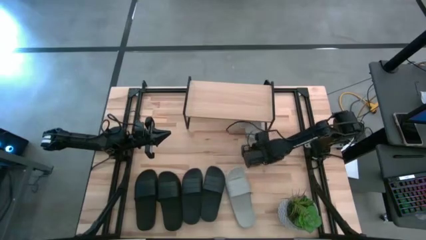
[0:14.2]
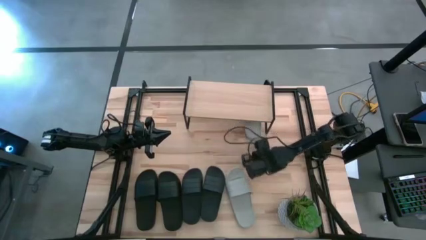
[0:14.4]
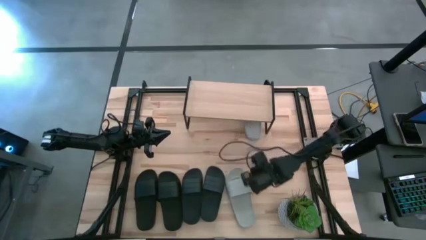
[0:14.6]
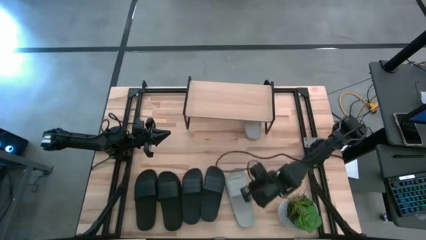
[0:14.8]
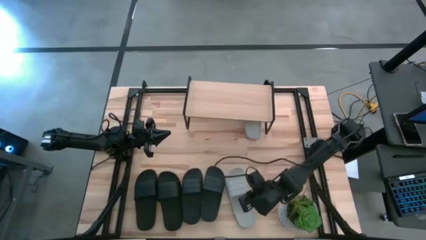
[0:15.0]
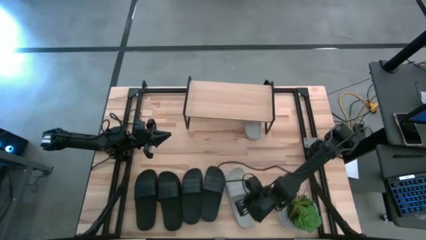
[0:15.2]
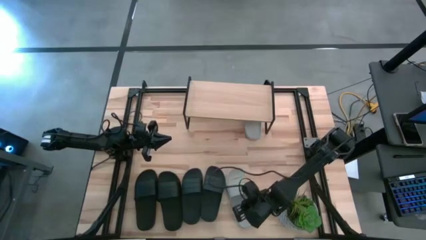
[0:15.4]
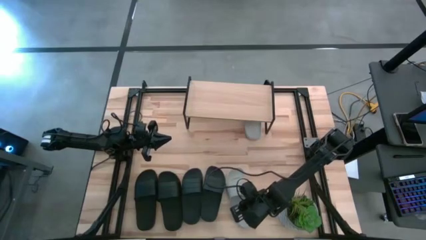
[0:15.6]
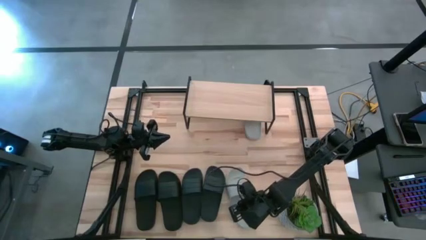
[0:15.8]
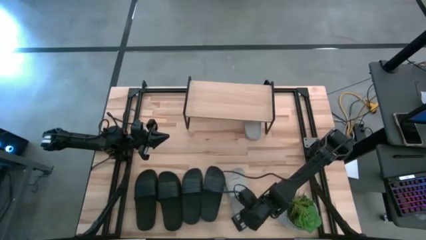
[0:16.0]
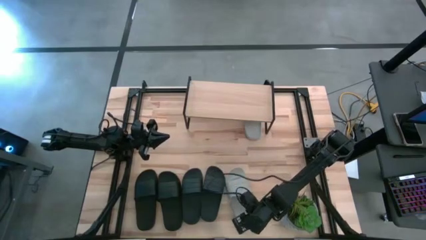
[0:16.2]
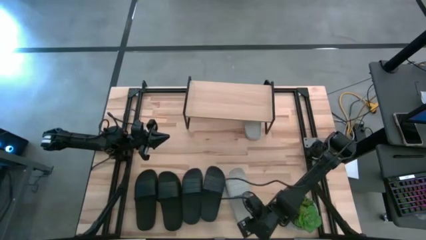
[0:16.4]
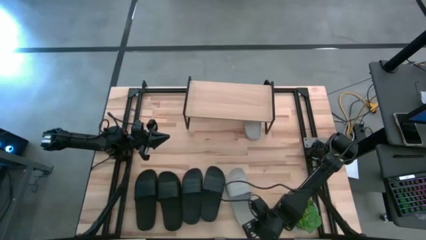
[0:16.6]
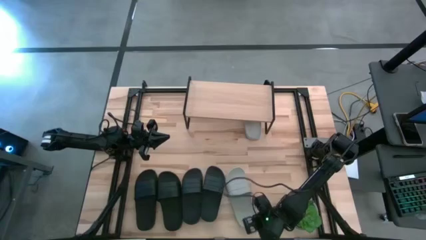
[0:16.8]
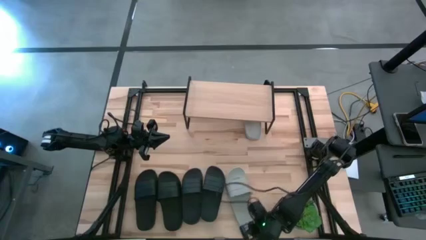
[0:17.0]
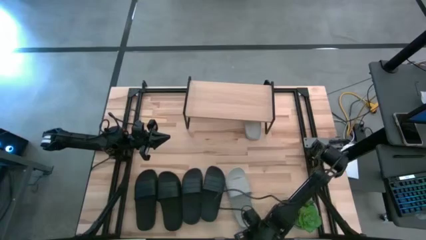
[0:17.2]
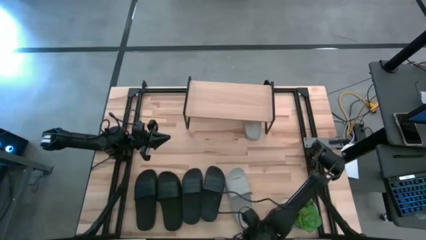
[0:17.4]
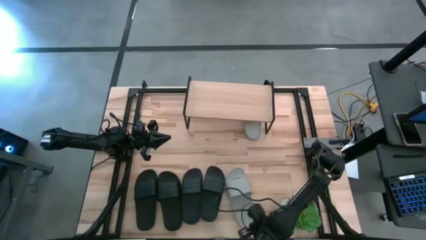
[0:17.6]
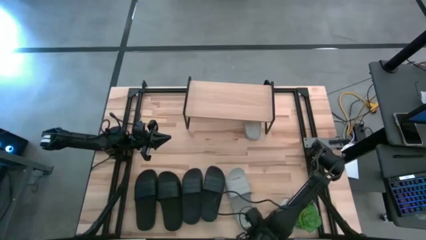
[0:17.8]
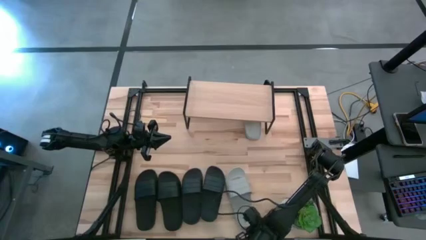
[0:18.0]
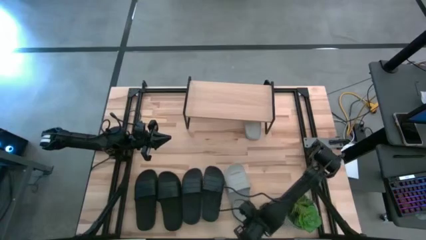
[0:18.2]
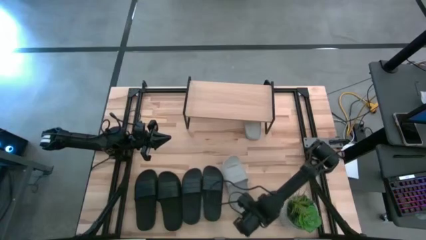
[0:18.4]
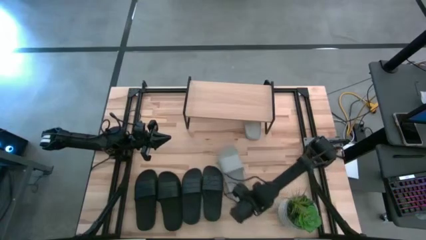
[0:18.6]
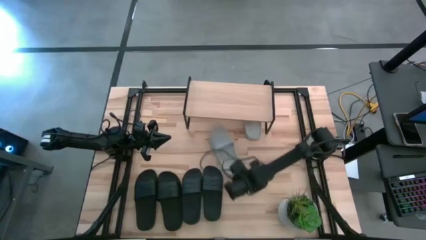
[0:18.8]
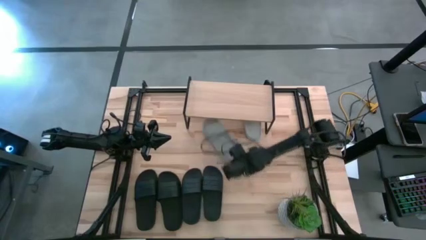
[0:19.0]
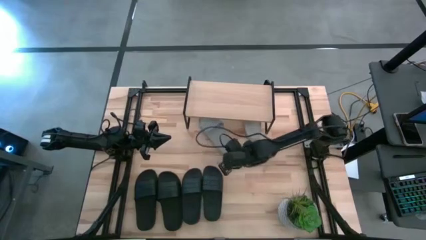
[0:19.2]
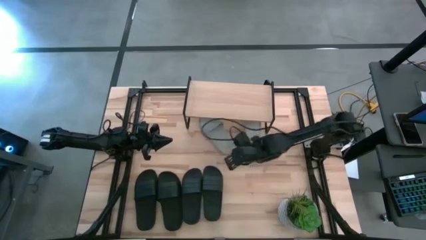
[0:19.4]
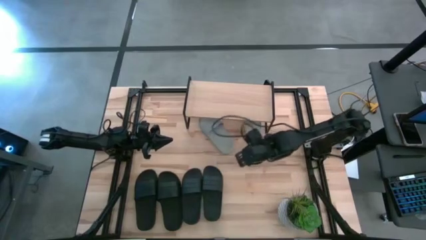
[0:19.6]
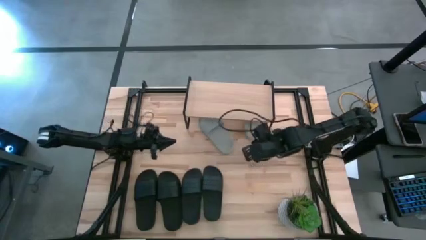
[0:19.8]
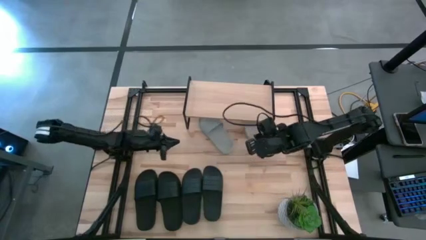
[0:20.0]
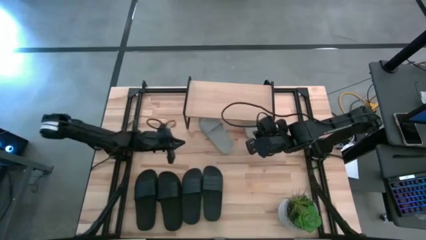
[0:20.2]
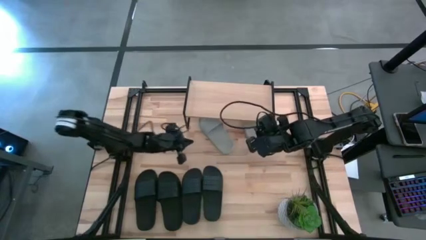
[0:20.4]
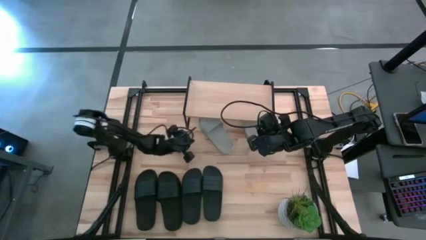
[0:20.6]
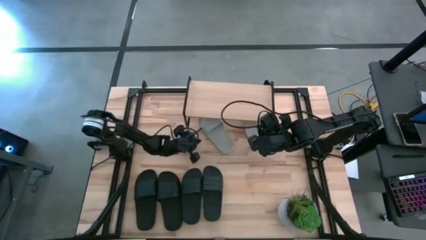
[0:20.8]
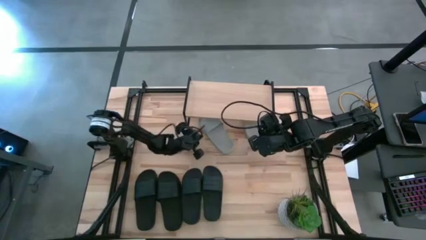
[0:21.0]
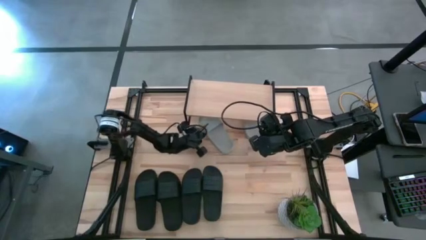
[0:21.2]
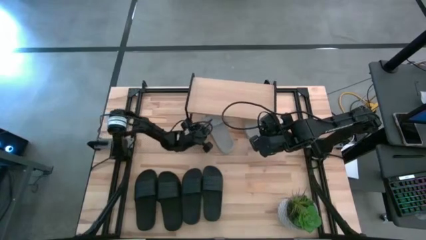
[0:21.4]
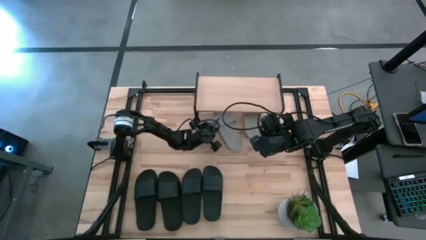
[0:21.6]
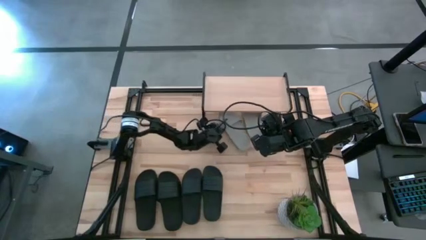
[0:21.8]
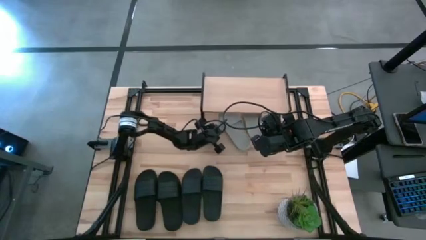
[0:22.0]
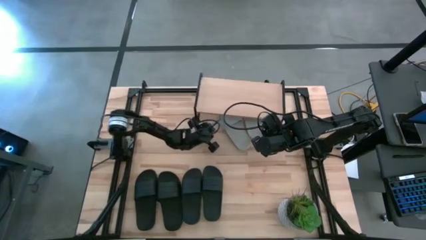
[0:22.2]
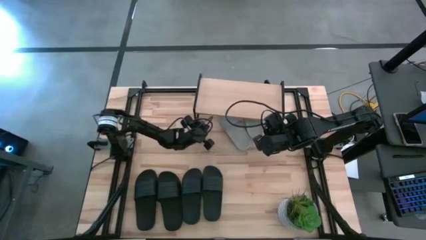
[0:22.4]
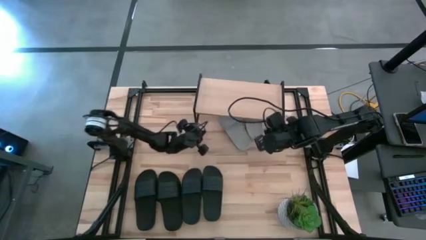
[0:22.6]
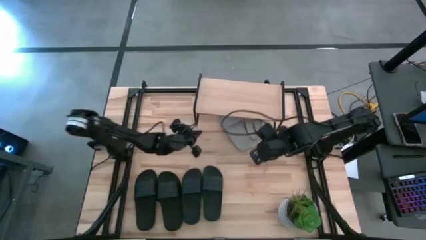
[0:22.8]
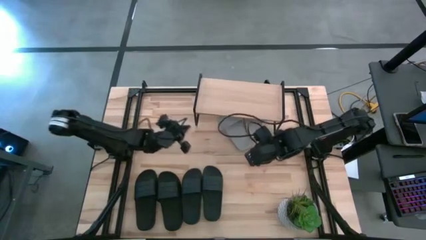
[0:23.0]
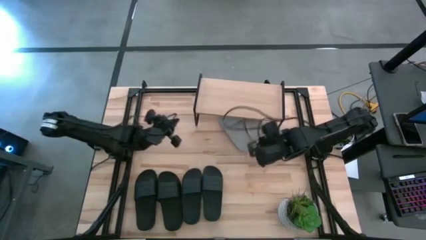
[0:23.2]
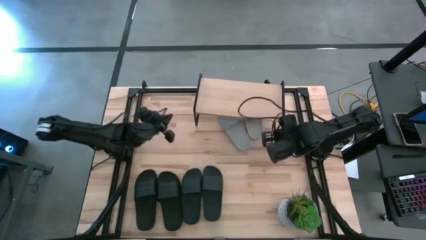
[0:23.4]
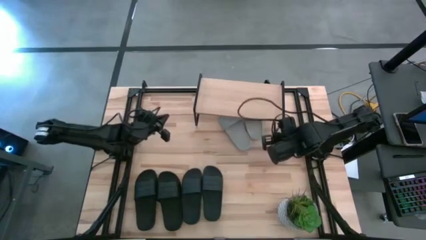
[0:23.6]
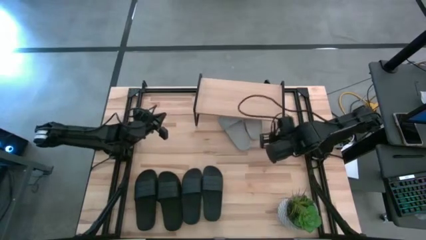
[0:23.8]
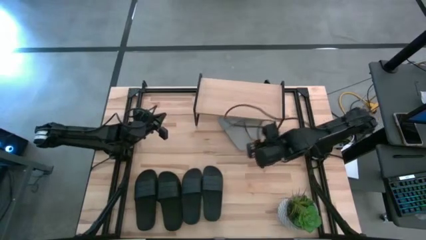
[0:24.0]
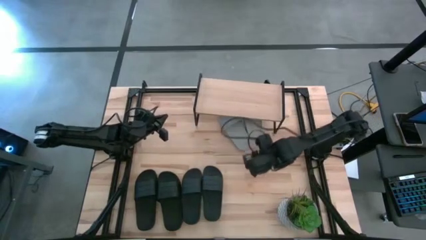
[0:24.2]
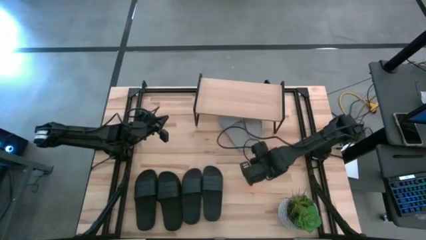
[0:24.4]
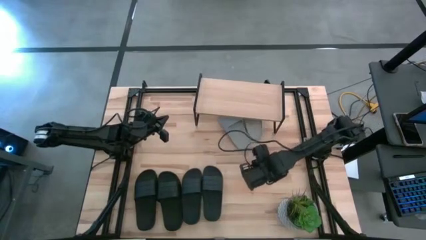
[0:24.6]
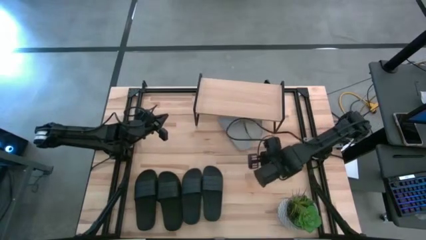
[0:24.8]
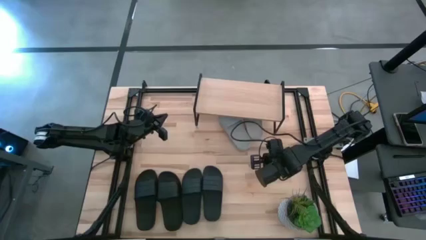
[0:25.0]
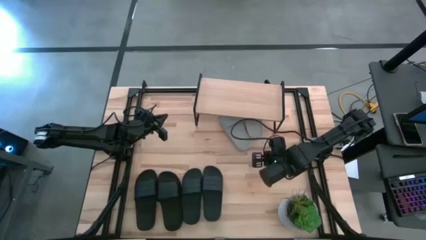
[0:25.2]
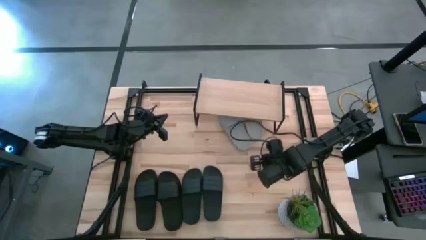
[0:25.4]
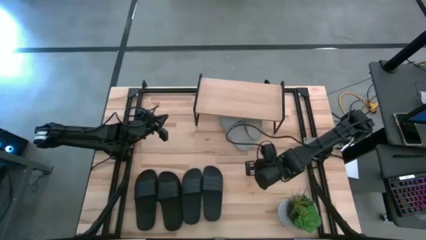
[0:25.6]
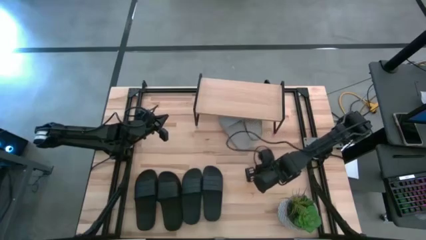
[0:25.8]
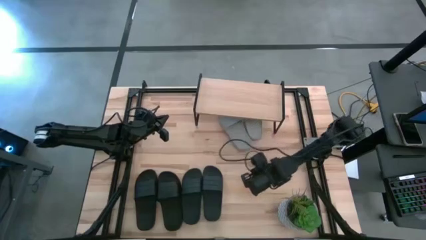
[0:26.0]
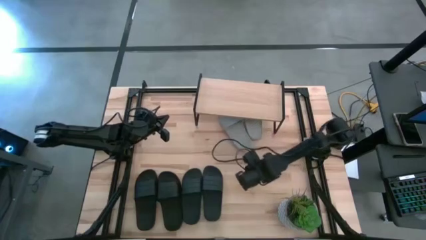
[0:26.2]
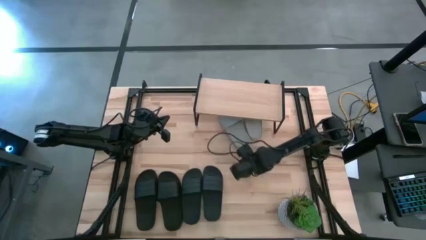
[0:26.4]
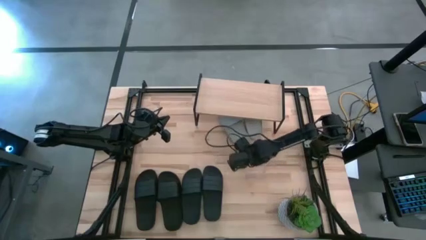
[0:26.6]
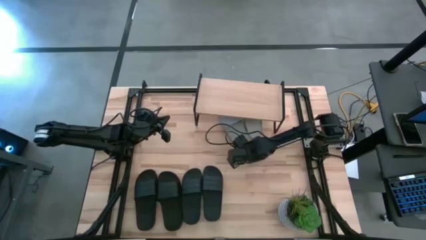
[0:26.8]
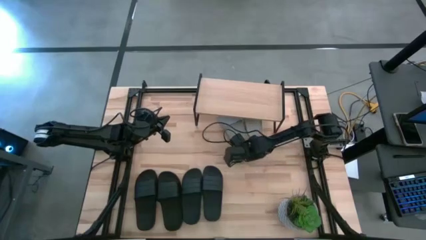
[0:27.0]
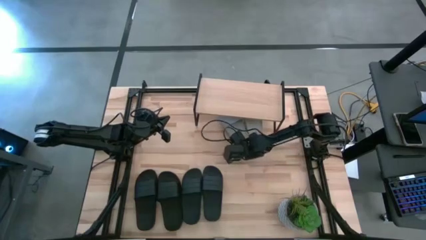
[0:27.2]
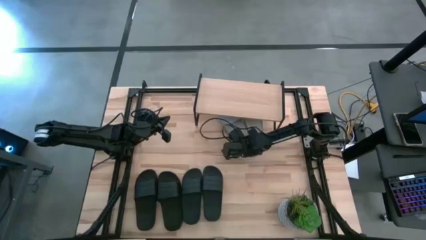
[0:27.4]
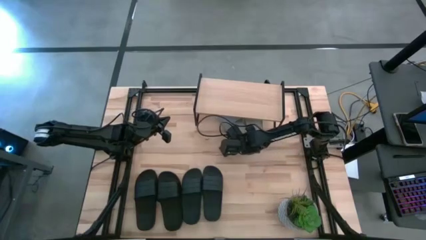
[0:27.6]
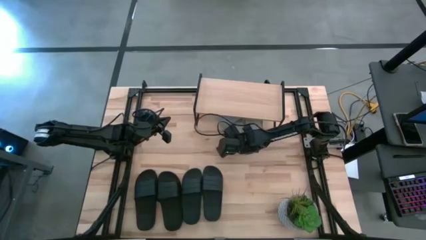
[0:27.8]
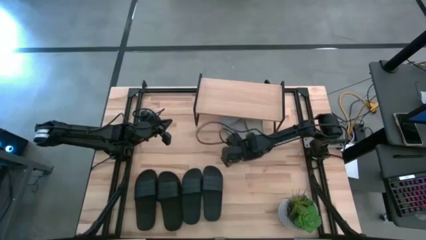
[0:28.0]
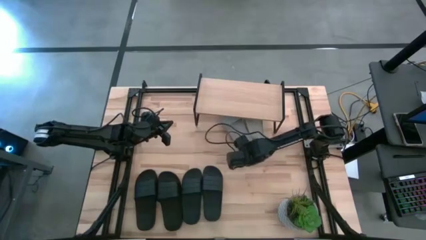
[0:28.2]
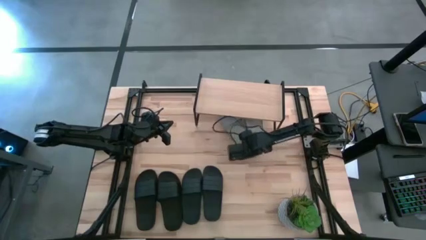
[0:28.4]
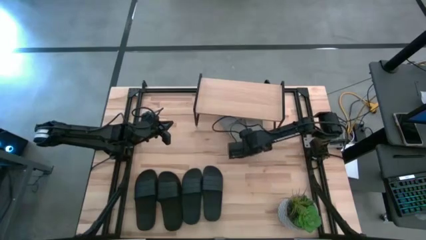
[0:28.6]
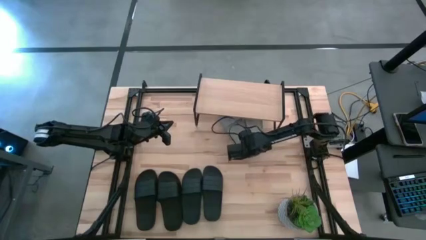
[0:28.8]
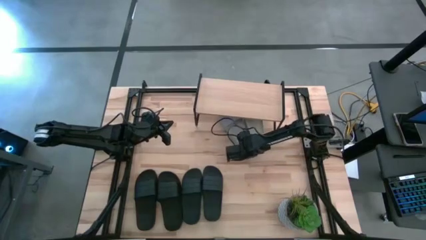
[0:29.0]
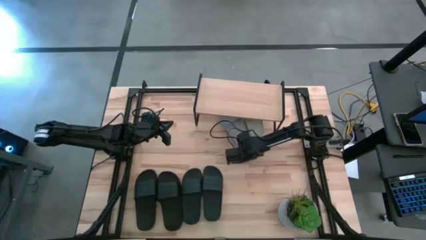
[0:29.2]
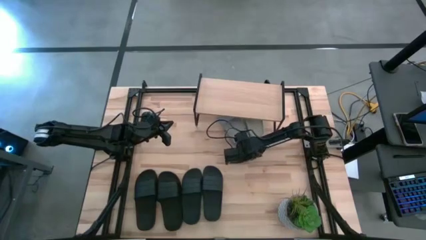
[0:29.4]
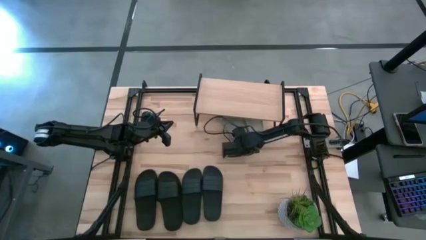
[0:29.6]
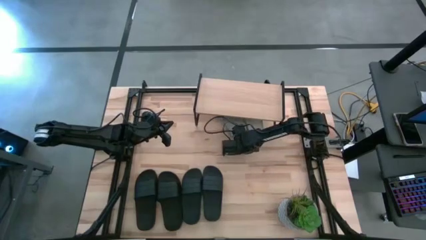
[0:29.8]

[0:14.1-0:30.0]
Task: Pick and place slides into the shelf
Move the gray slide under the shelf
